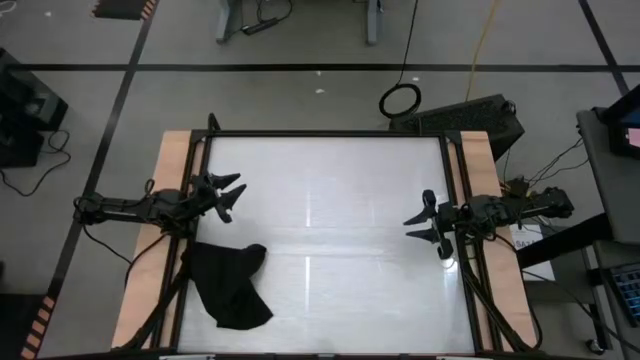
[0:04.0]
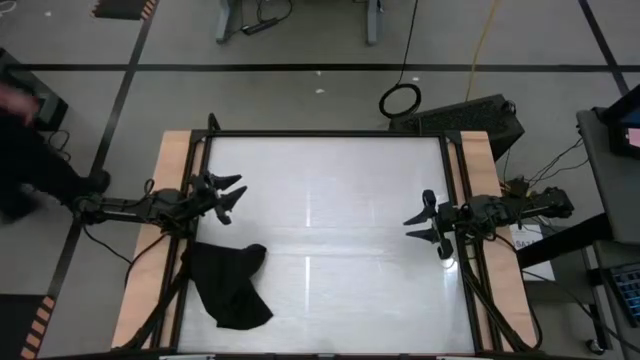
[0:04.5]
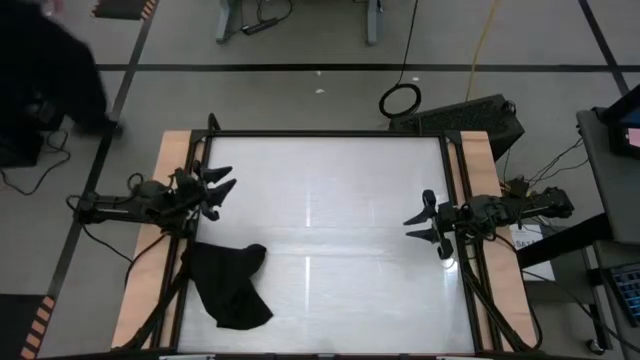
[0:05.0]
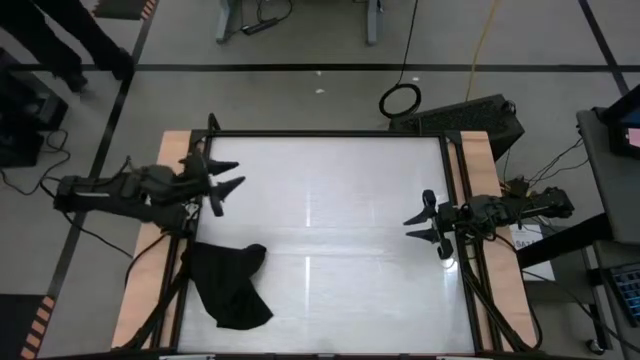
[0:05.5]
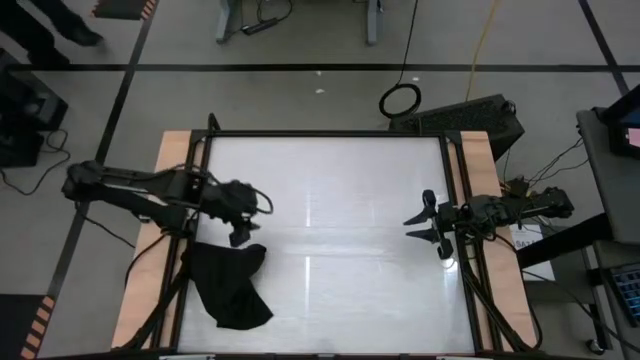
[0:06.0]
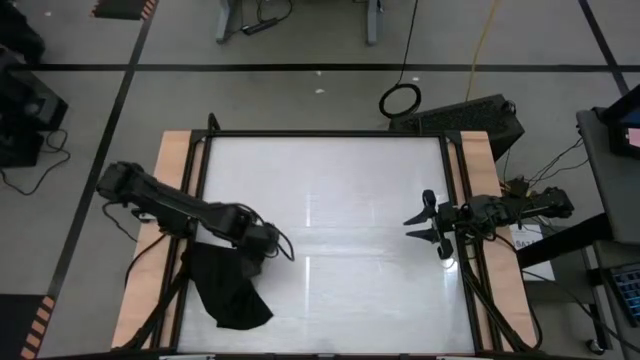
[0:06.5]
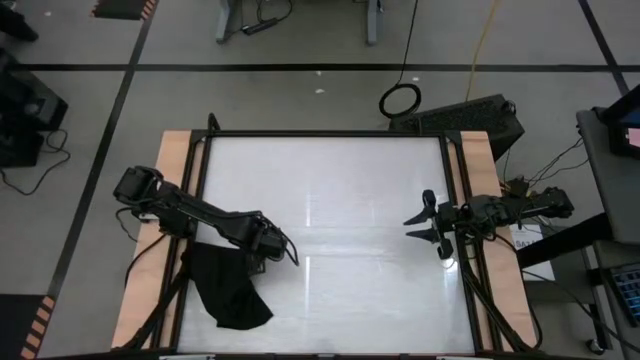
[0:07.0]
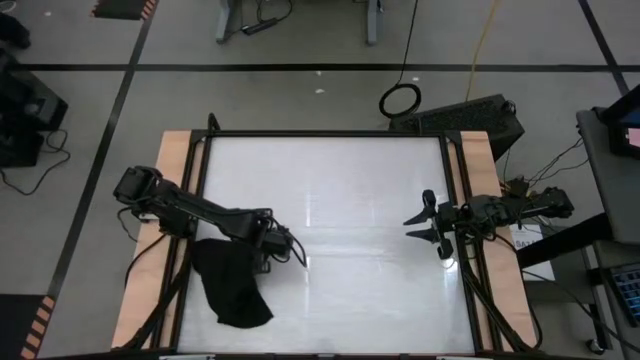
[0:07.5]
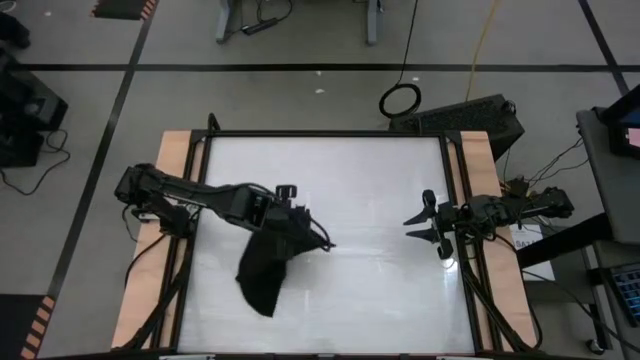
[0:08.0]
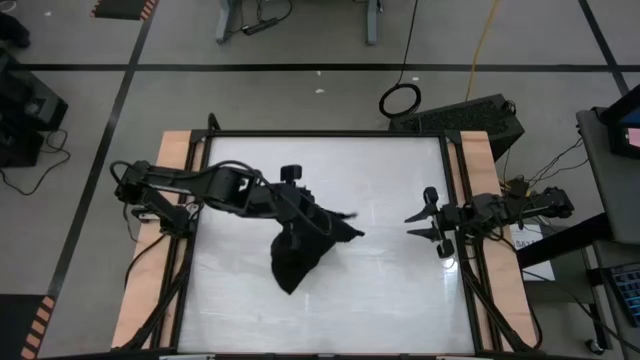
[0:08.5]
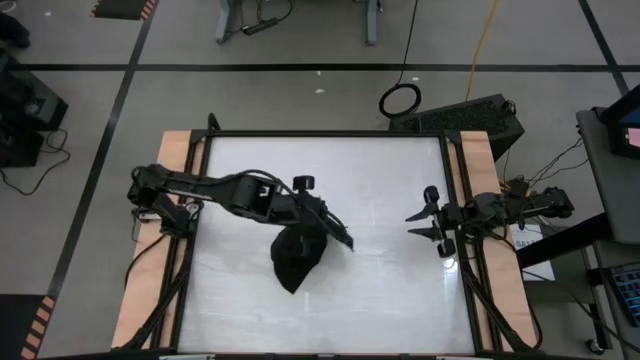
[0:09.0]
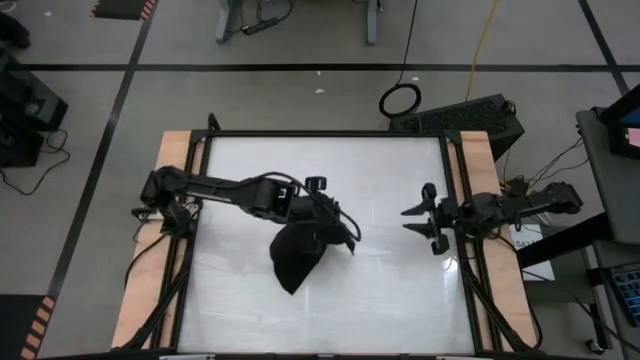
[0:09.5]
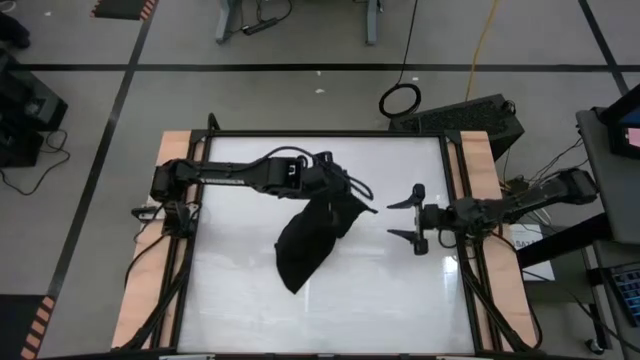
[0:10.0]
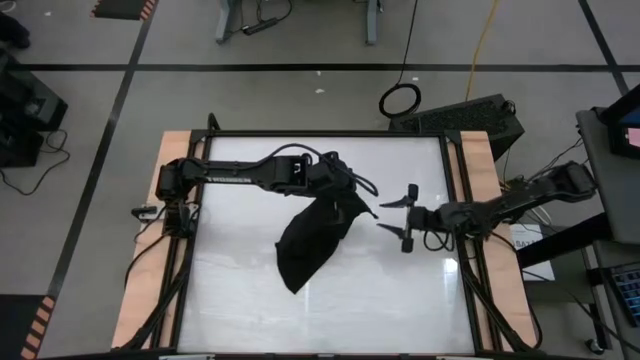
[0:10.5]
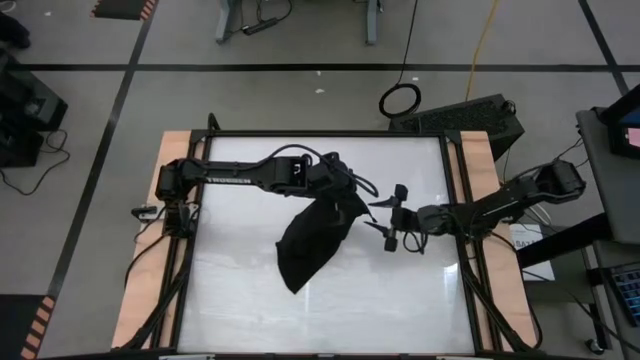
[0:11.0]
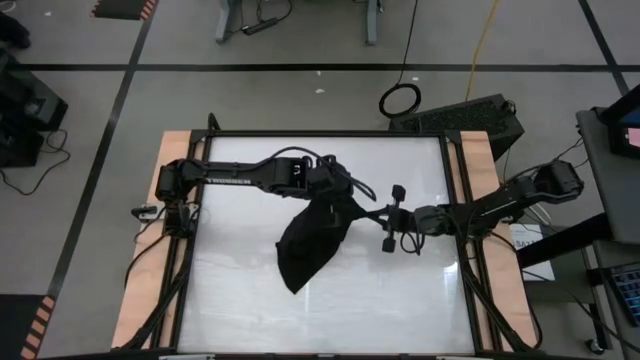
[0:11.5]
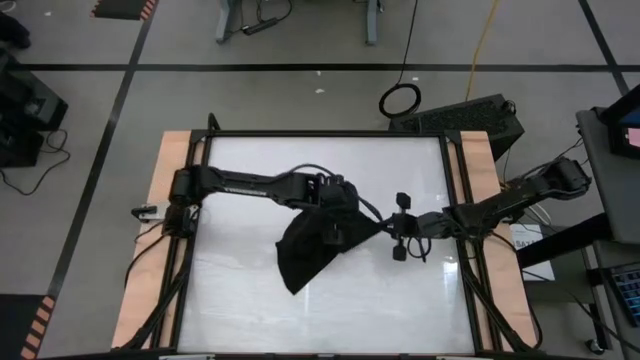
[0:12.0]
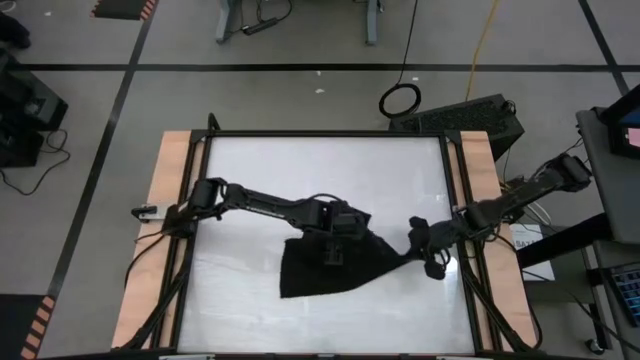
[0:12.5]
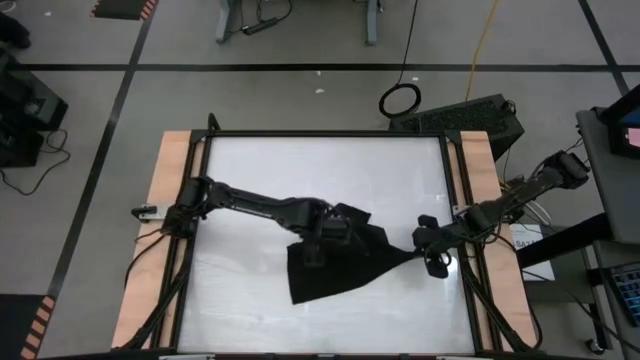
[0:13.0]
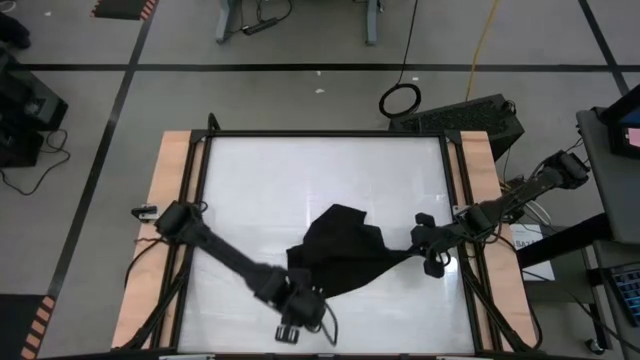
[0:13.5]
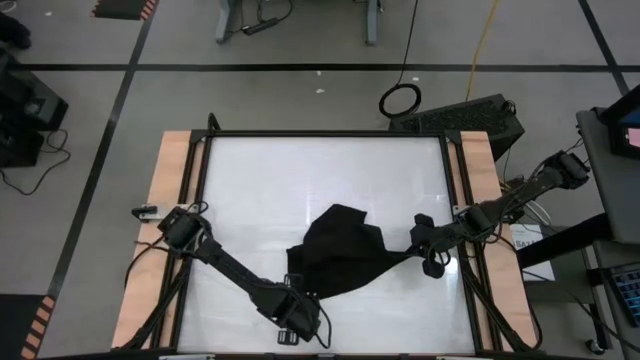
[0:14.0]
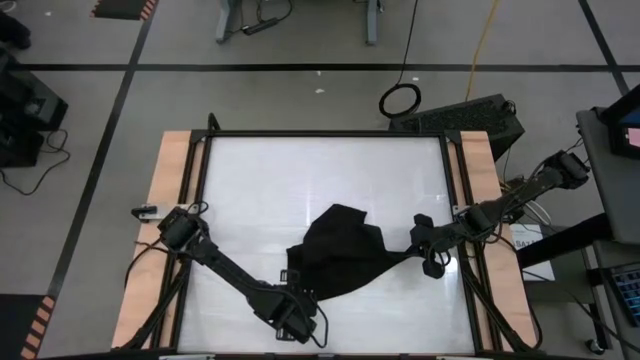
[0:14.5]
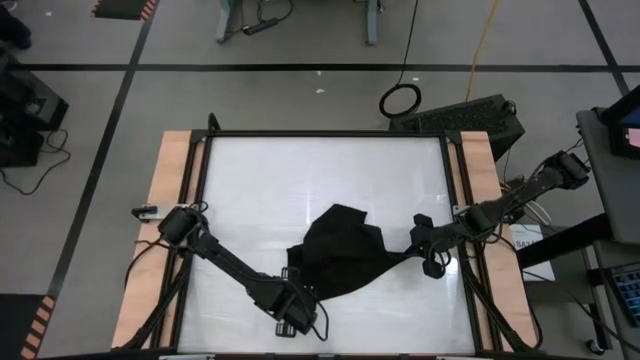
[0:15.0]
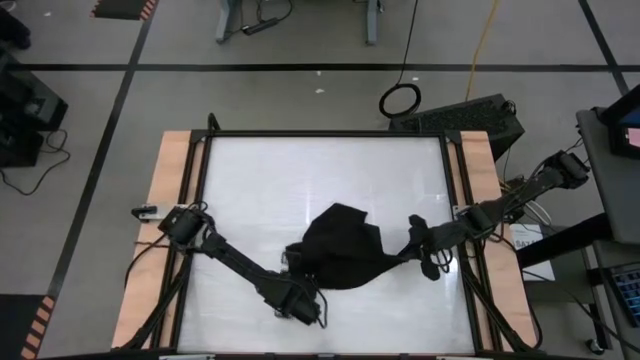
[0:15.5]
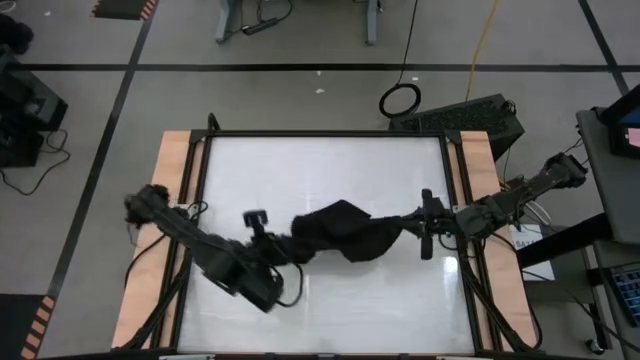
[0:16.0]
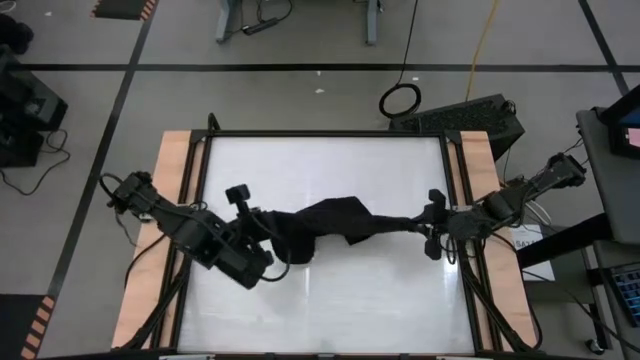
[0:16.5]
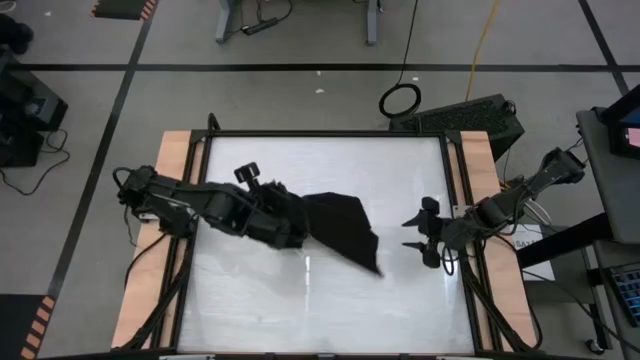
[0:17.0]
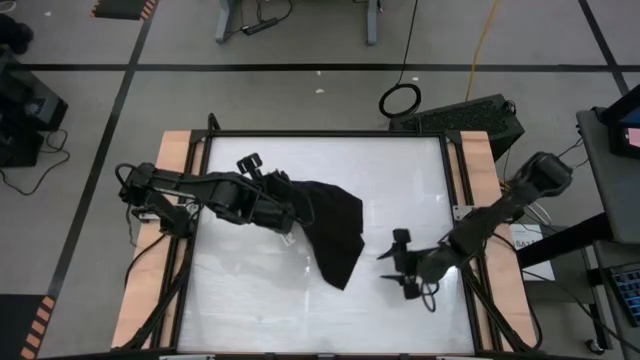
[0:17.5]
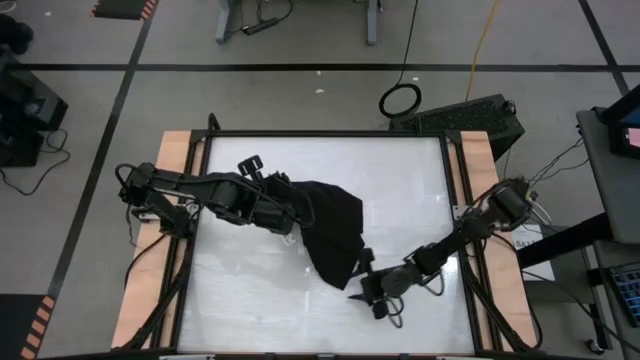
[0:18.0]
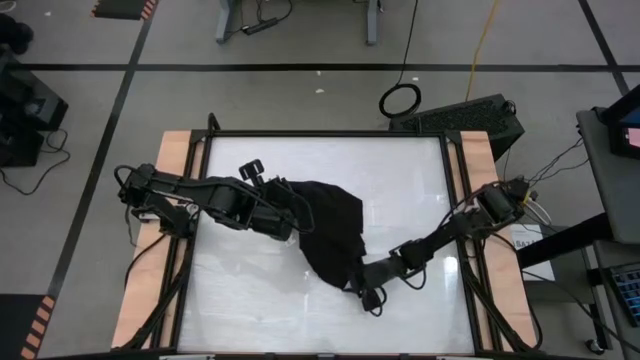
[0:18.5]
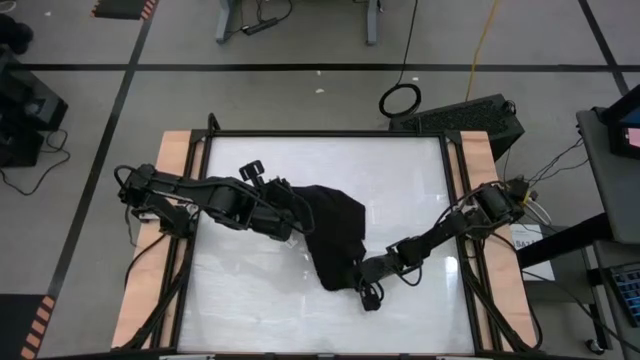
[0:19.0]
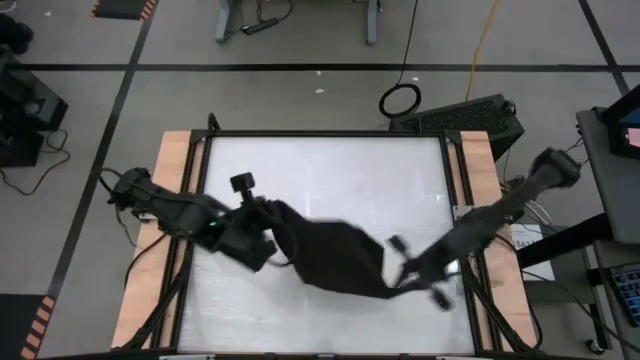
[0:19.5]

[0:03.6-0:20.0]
Task: Roll towel into tight, uniform cylinder
Roll the black towel

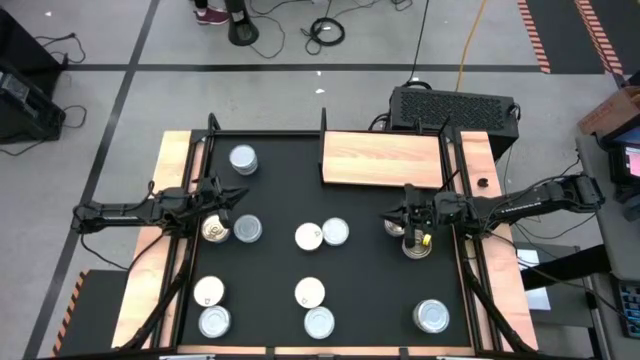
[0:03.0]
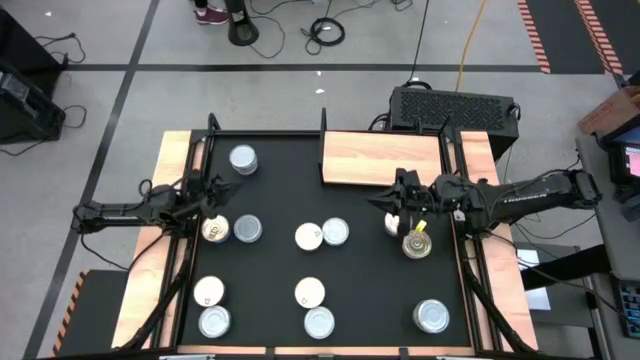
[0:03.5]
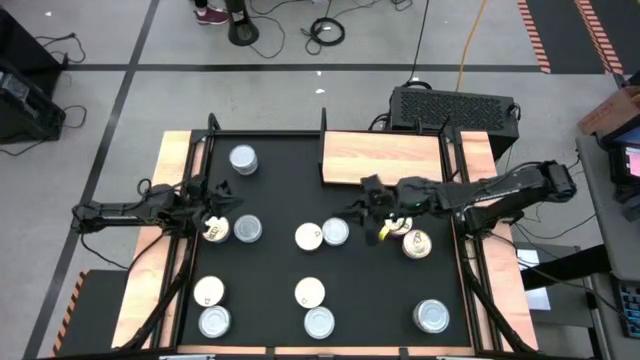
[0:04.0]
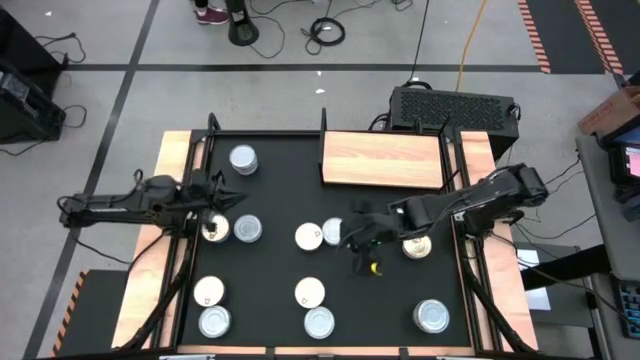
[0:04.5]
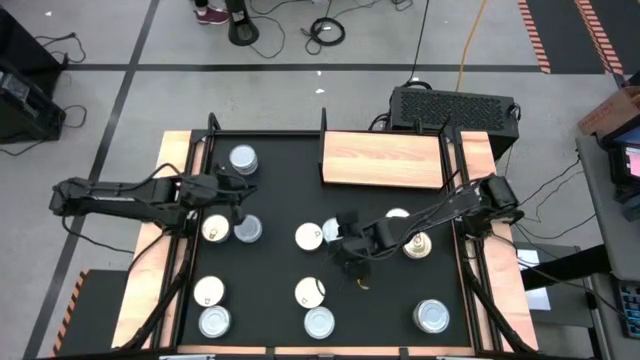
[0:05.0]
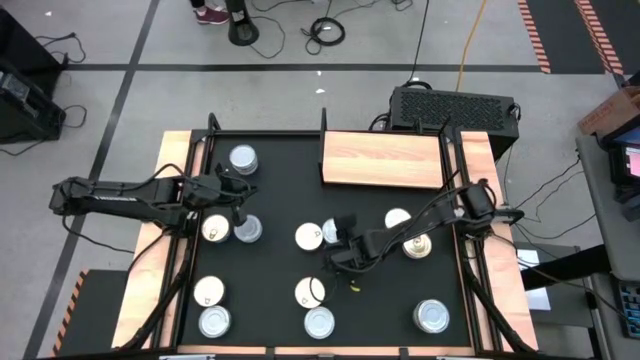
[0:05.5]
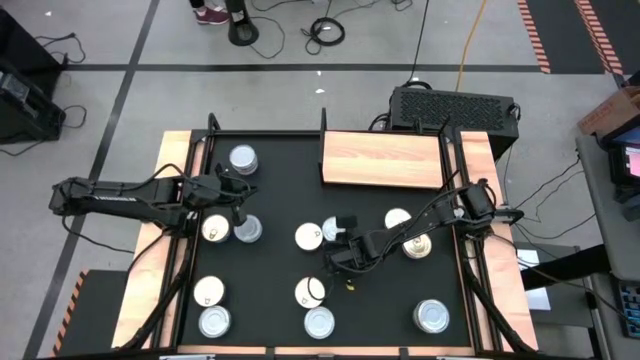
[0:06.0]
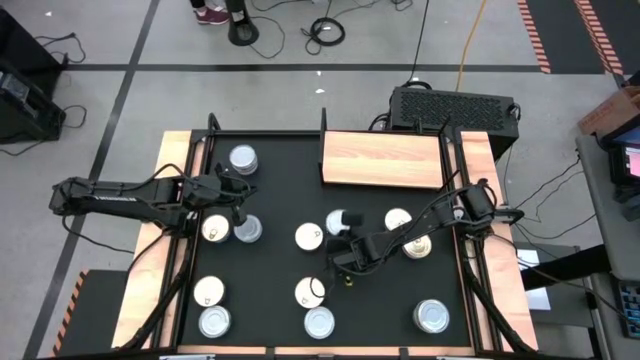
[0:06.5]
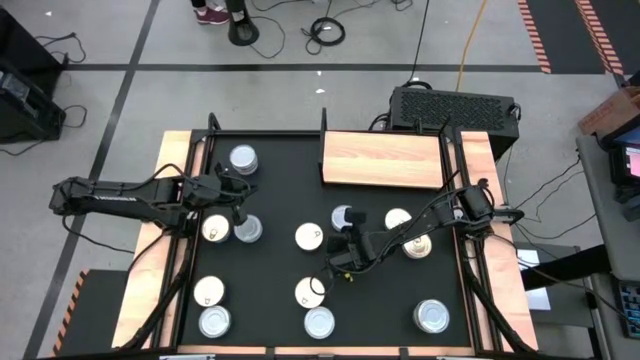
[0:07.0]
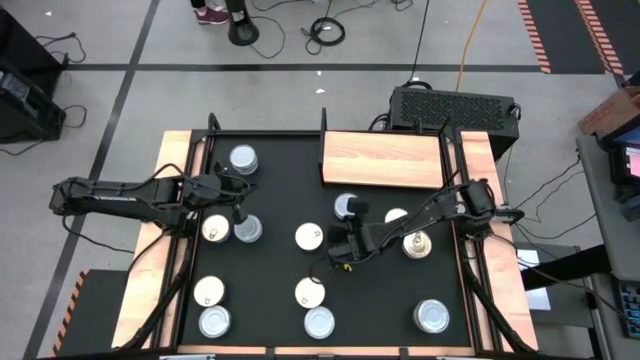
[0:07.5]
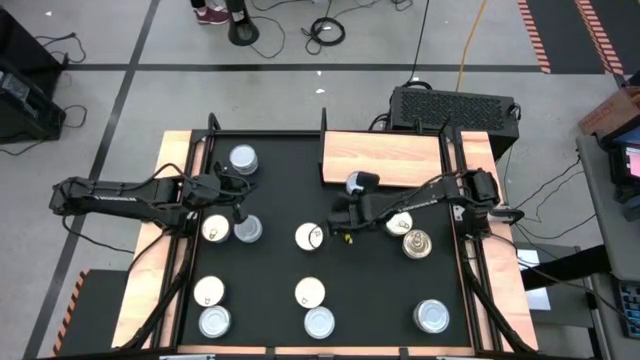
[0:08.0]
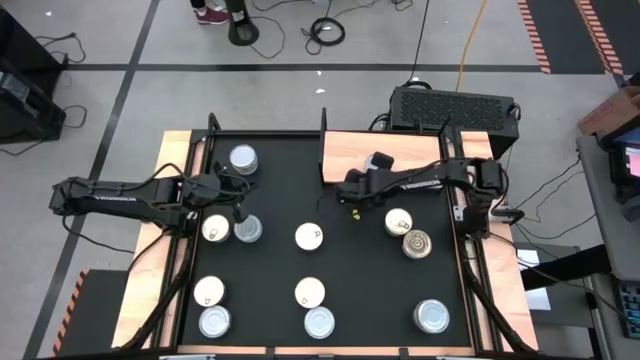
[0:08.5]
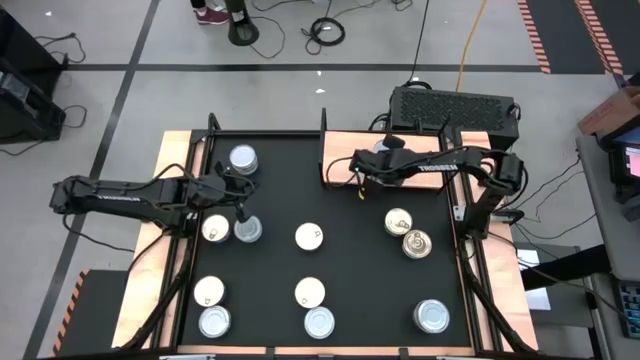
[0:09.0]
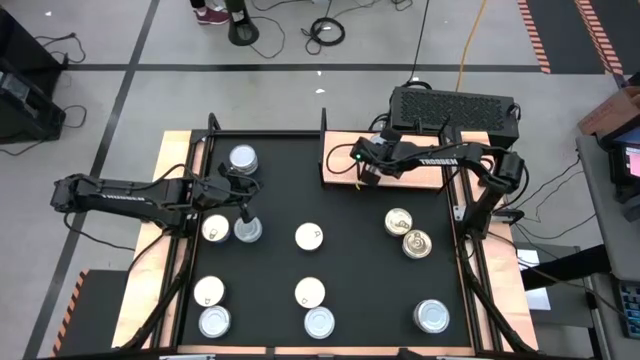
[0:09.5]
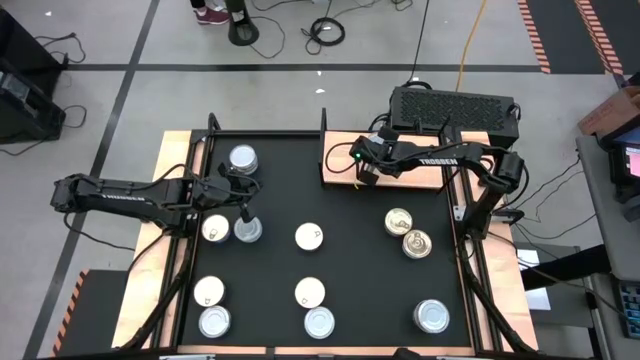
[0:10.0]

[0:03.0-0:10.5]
Task: Stack canned seafood by type on shelf
Put the green tuna can on the shelf
